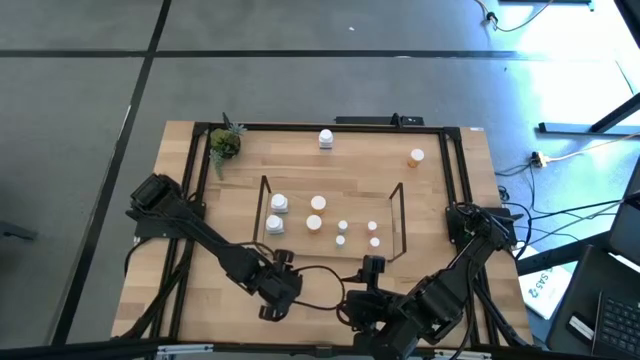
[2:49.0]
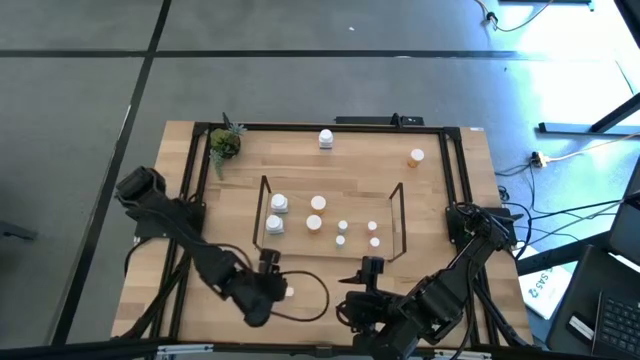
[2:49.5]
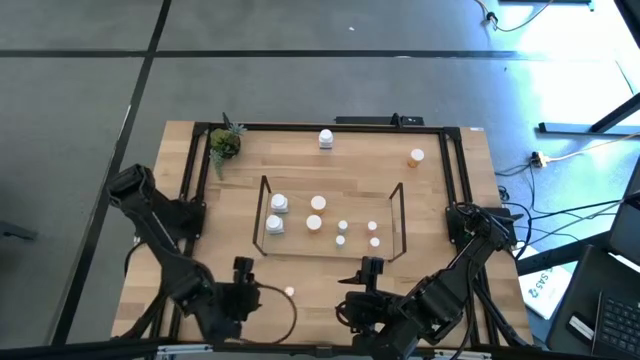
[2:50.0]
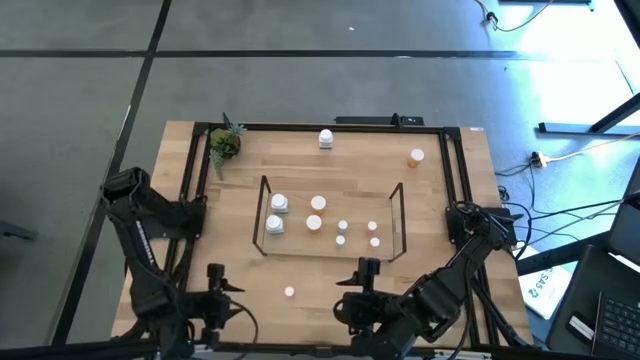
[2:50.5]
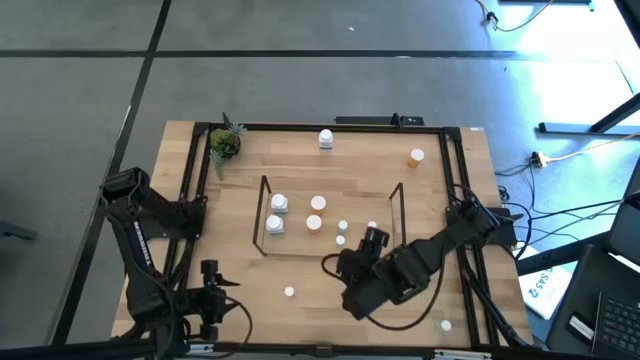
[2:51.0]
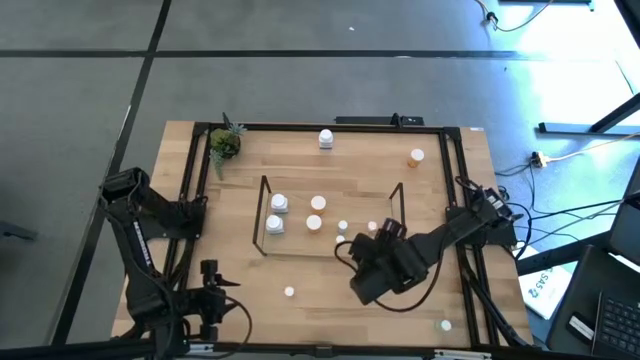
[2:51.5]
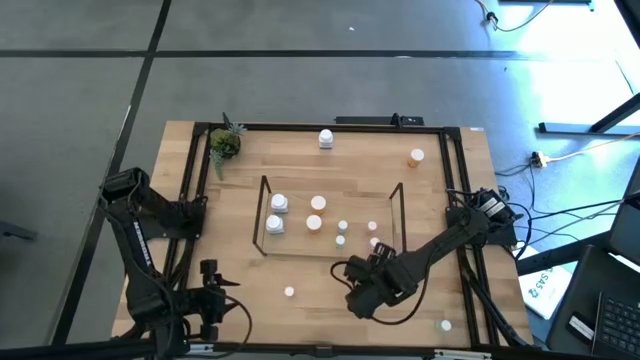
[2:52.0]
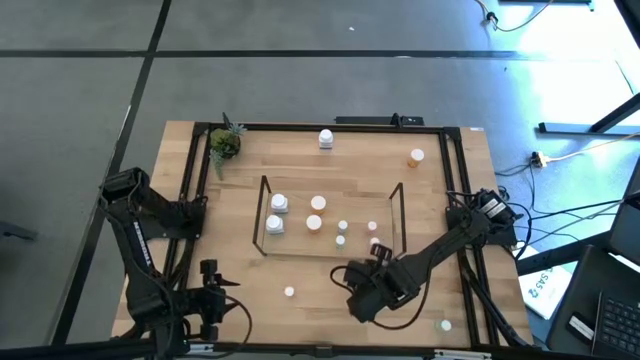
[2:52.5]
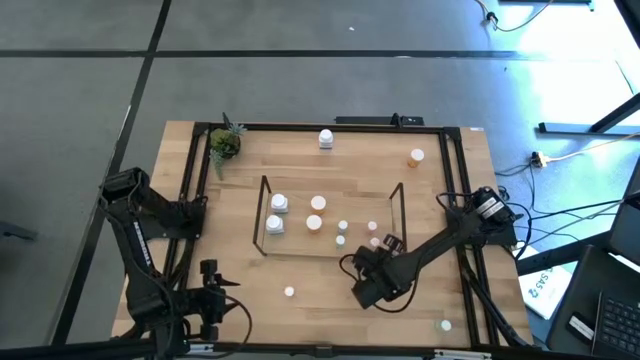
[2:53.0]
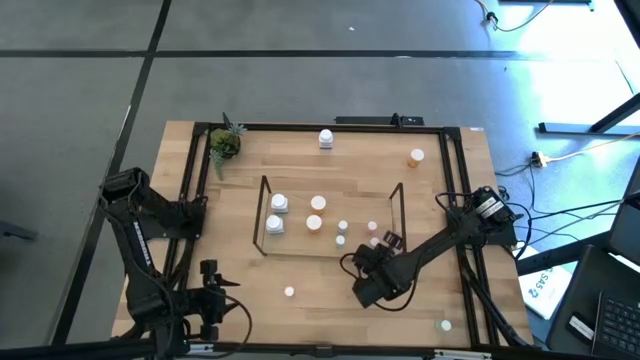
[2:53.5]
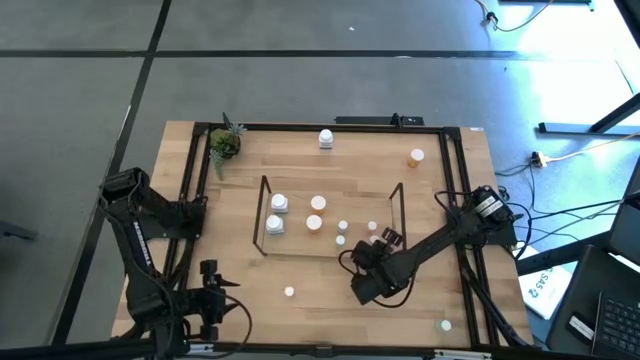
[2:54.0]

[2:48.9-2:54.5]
Task: Pick and place medicine bottles onto shelf by color
Adjust the pink bottle on the shelf

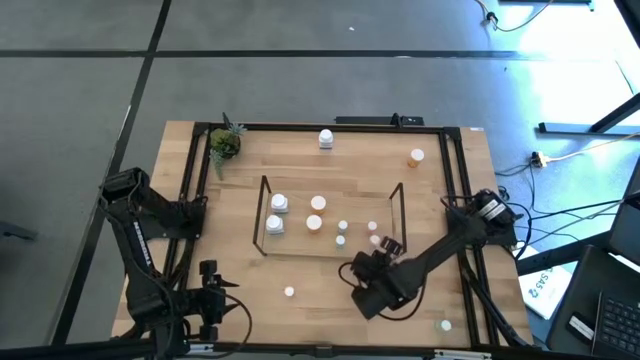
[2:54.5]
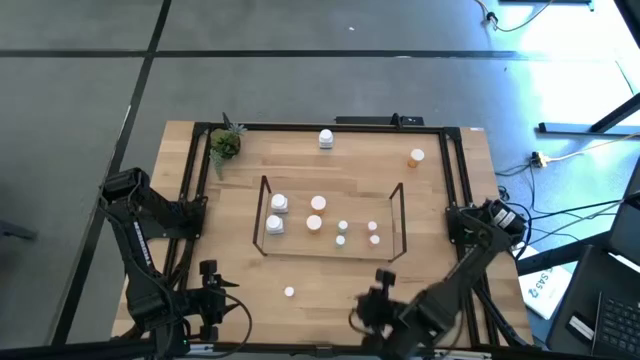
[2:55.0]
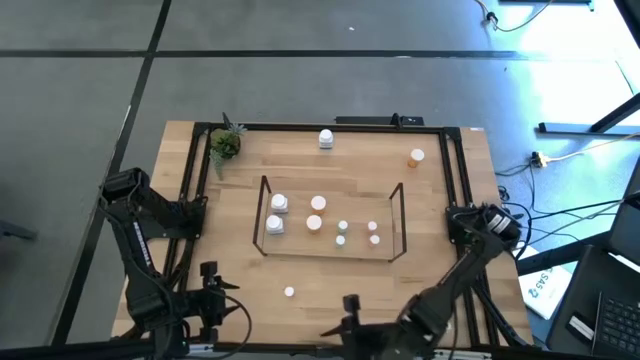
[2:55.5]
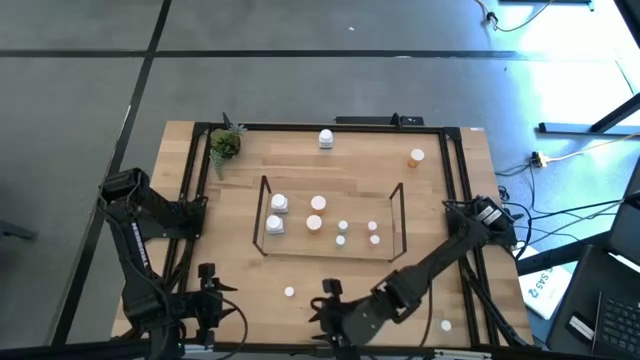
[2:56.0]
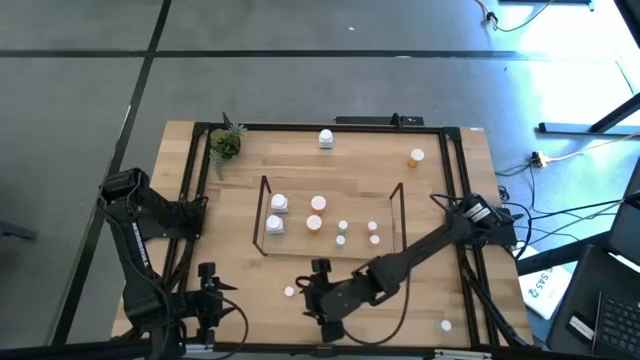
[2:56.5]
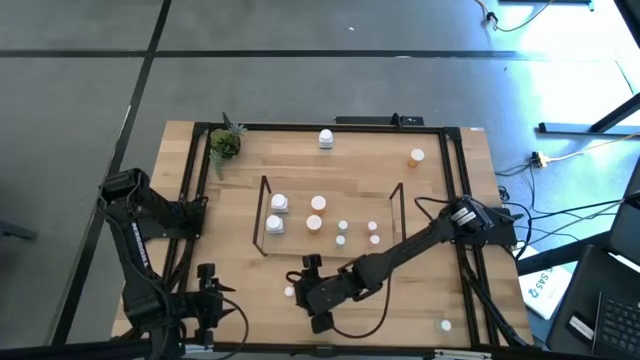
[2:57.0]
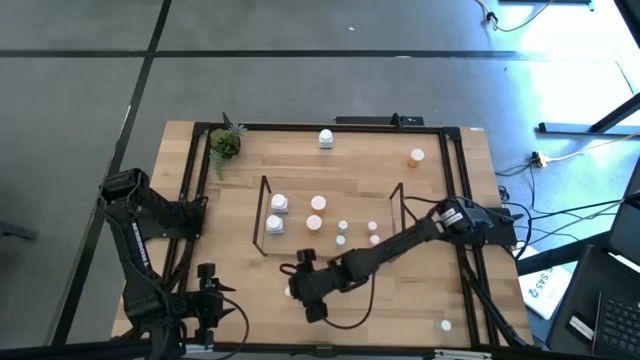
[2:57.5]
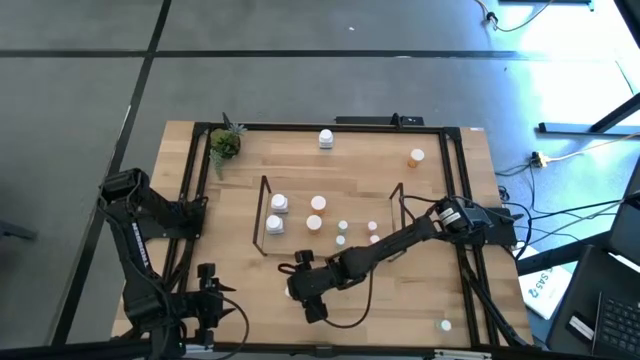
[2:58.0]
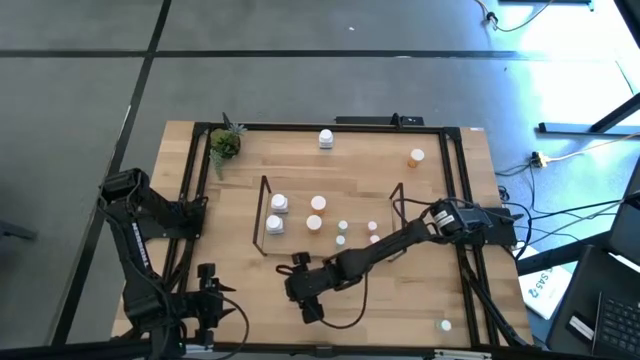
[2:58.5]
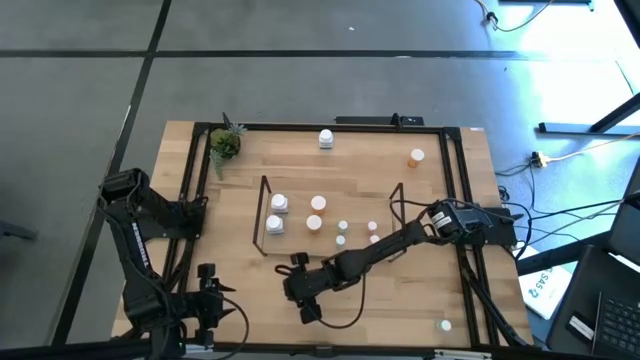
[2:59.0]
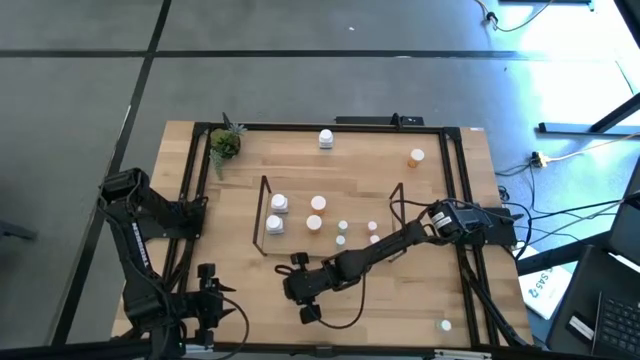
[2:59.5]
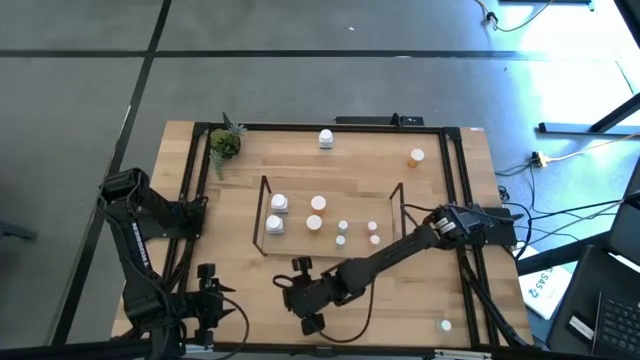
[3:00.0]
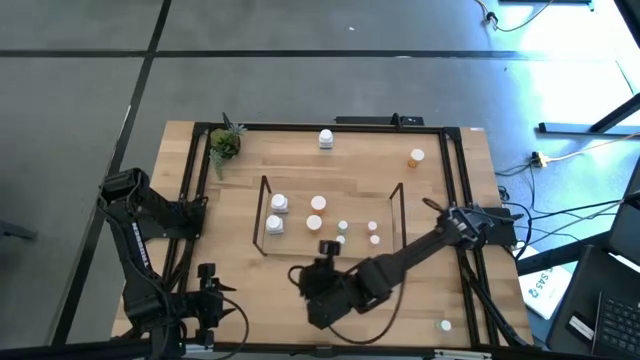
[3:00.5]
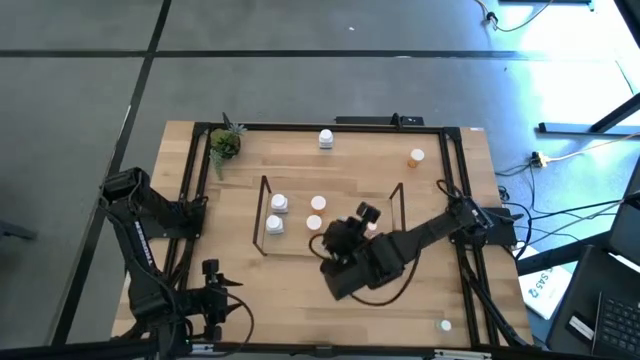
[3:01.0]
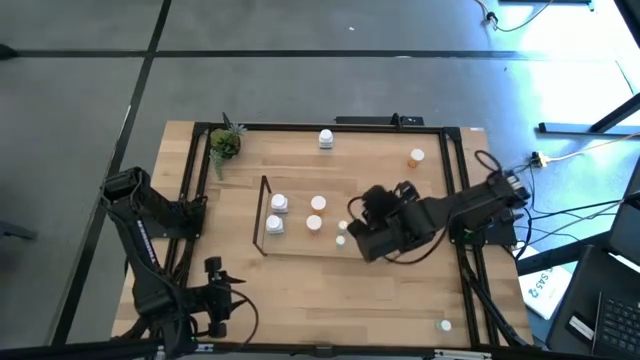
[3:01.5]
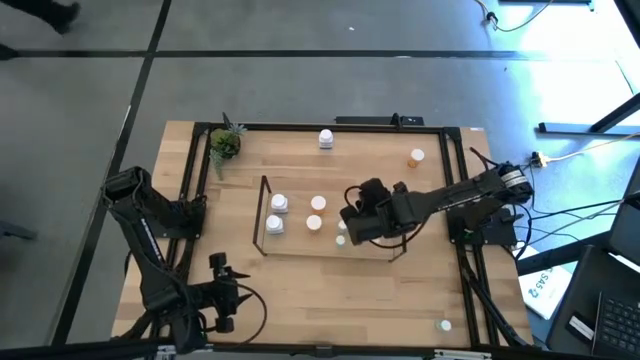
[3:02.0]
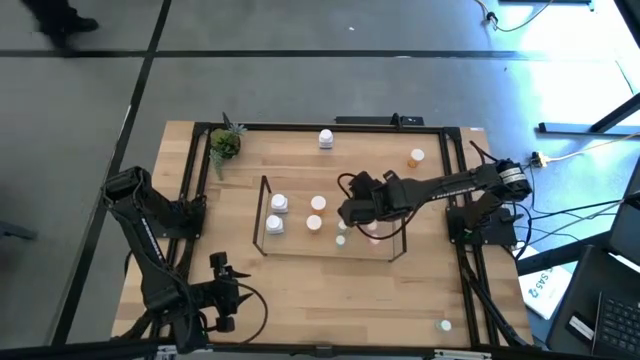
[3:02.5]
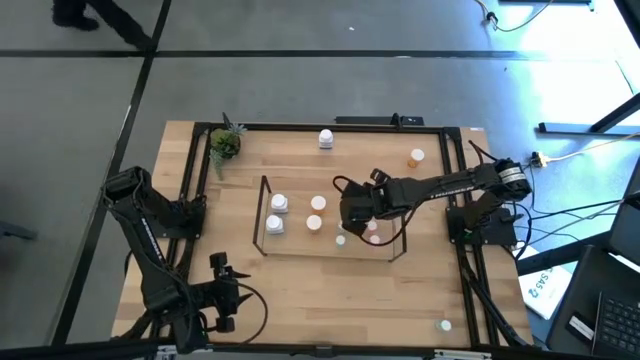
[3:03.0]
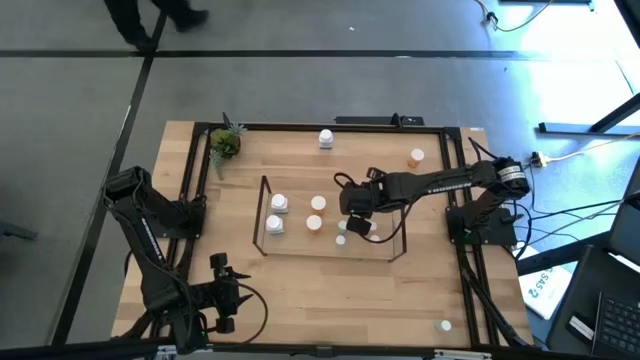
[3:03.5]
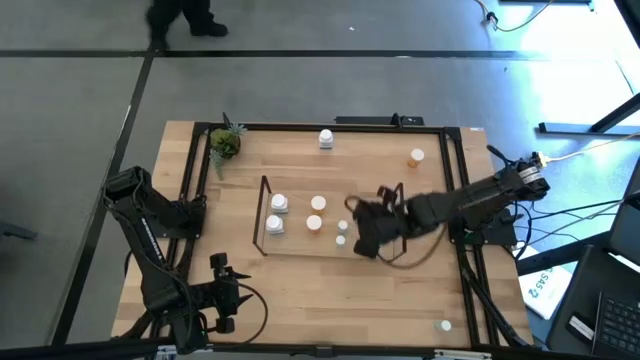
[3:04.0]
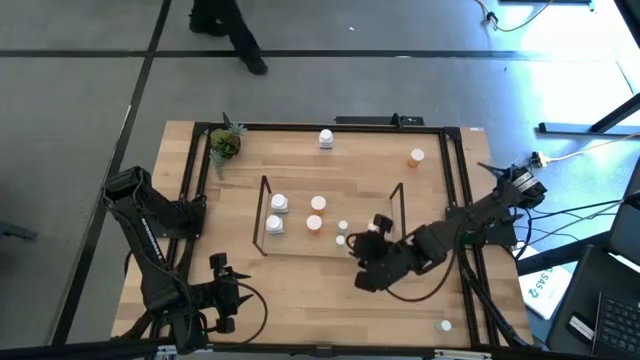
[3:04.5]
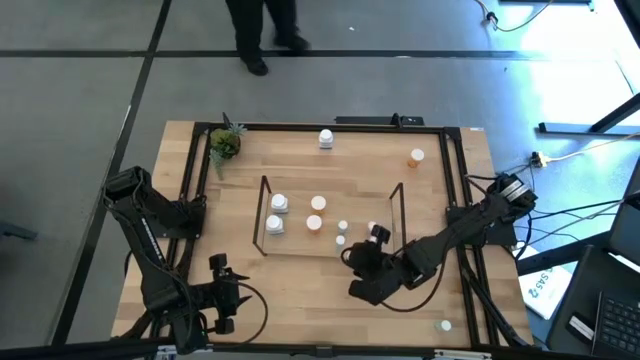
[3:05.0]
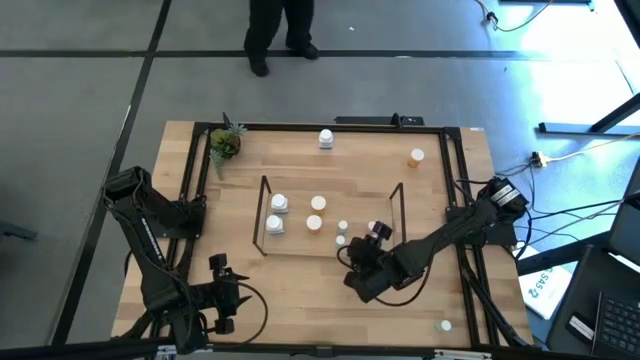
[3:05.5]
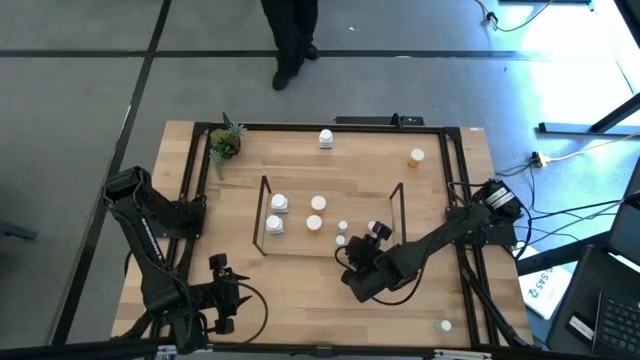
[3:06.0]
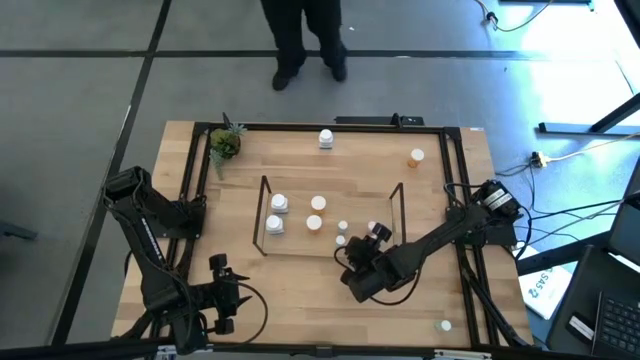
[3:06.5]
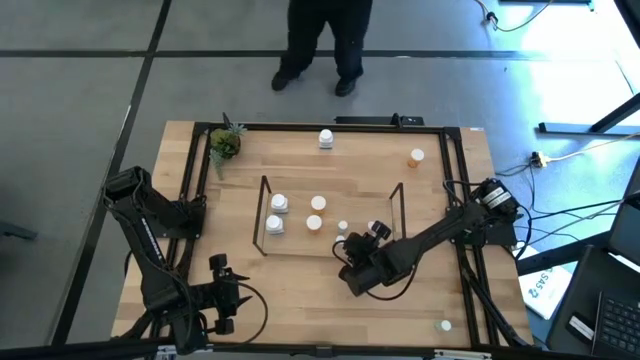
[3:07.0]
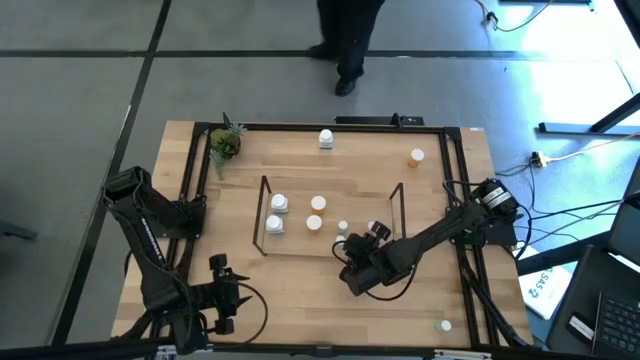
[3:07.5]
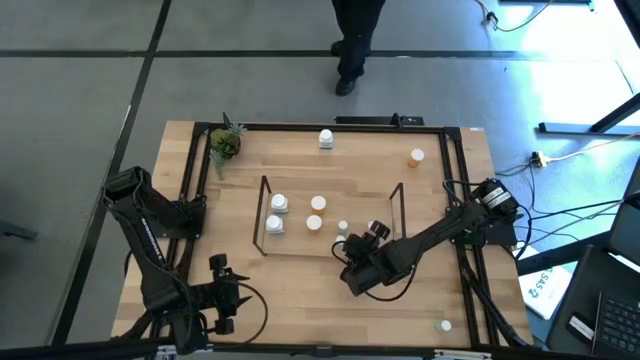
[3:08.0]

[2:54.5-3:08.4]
Put the pink pill bottle on the shelf

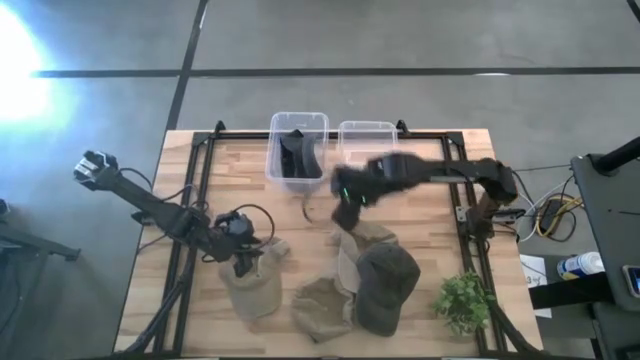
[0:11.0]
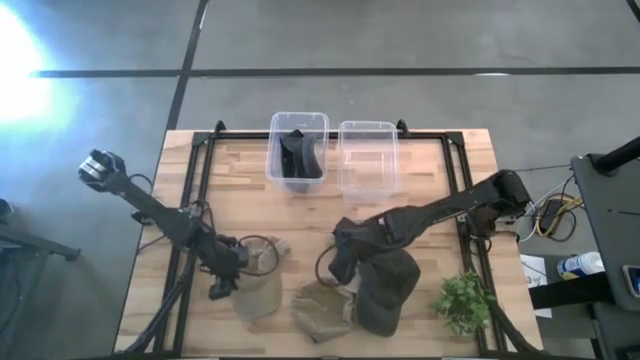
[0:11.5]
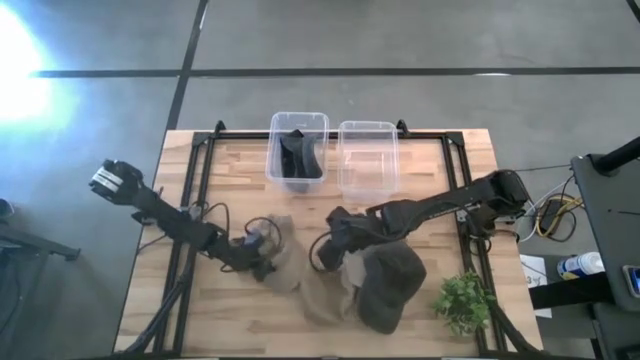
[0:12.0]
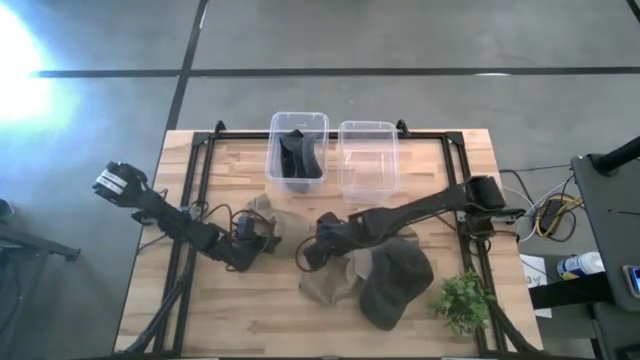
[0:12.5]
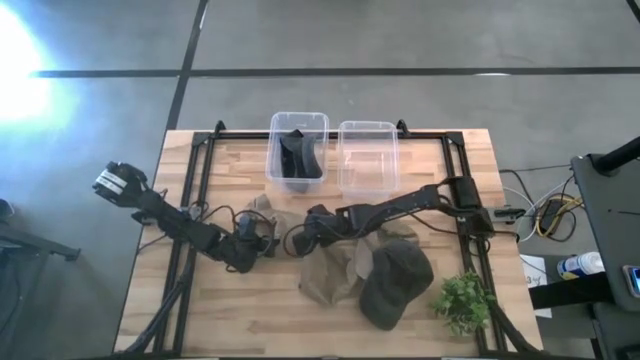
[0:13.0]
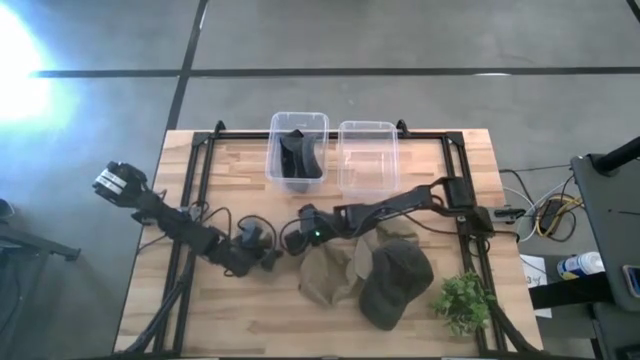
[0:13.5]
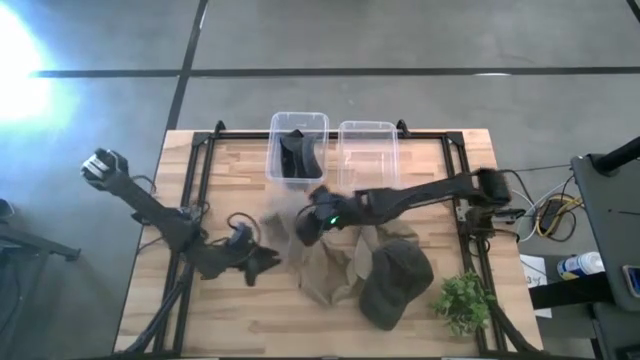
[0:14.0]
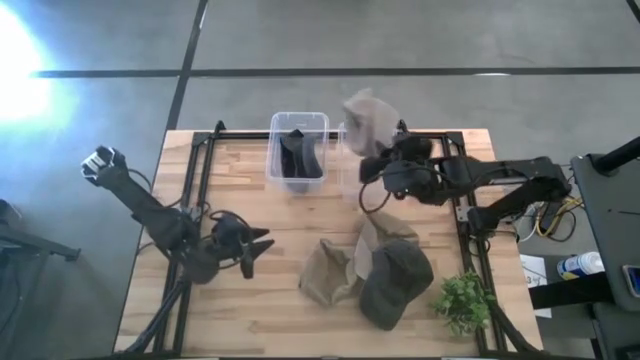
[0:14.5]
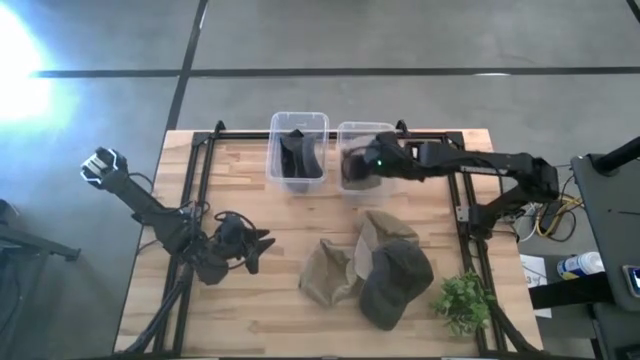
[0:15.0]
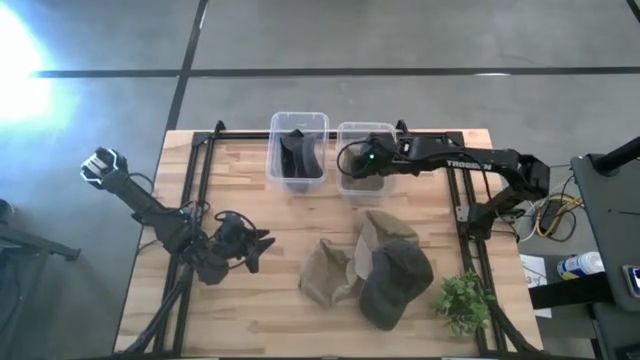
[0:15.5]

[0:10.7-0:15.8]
Task: Pick & Place hat
Put the left brown cap into the right transparent bin
